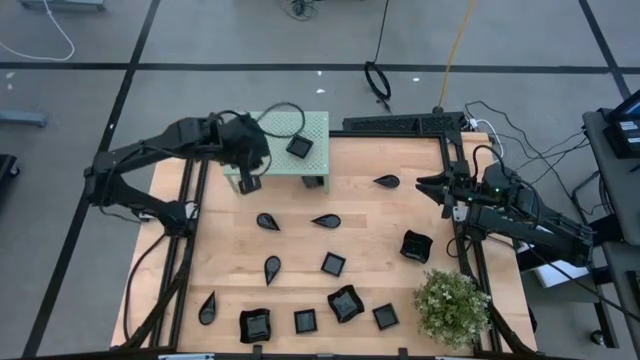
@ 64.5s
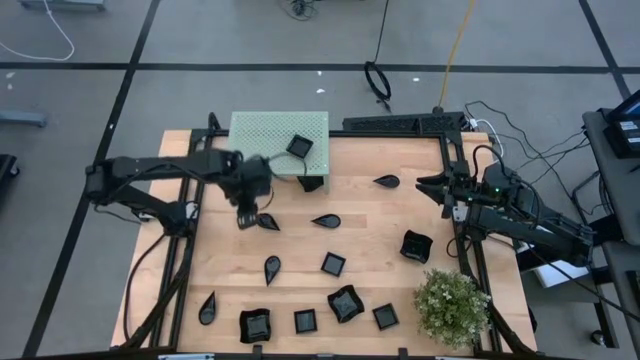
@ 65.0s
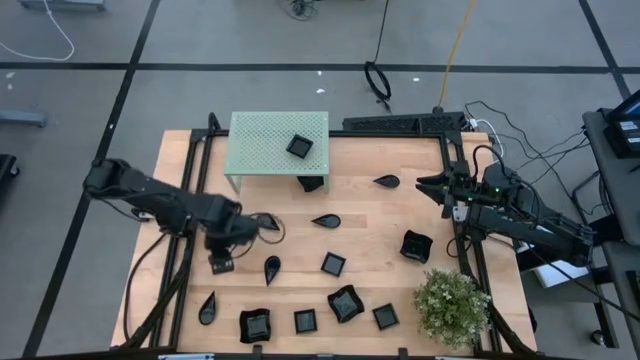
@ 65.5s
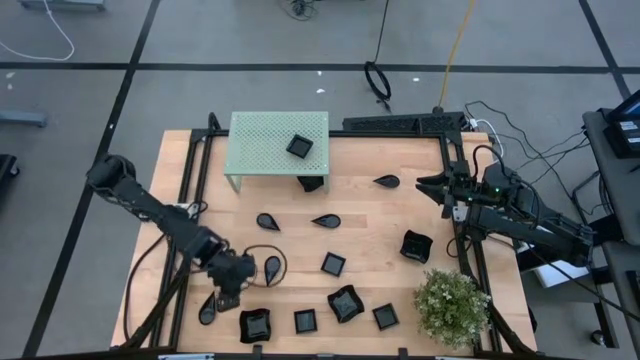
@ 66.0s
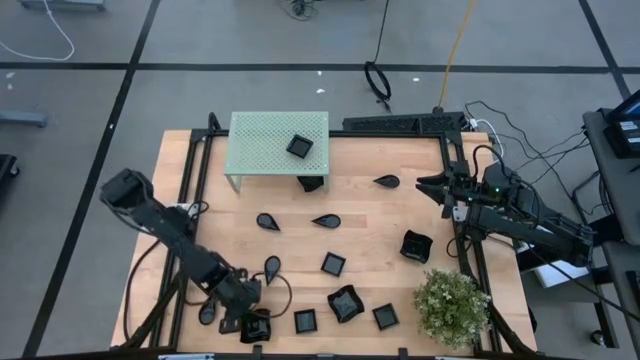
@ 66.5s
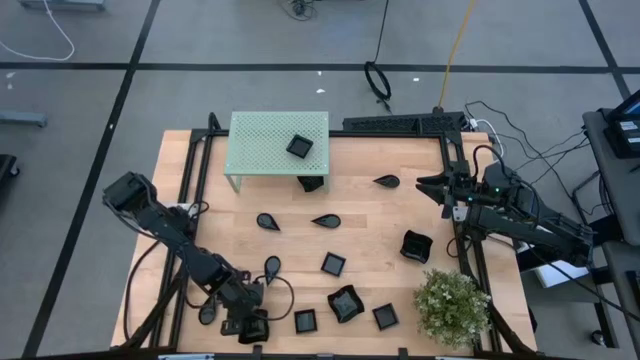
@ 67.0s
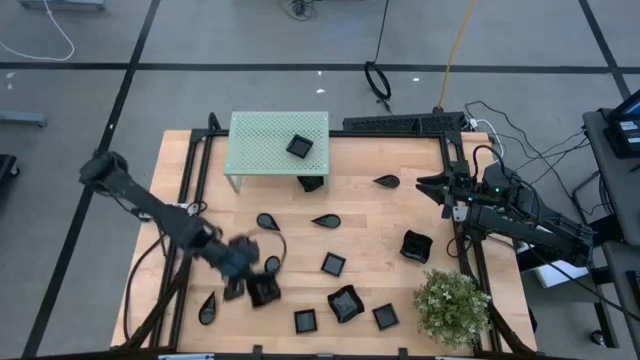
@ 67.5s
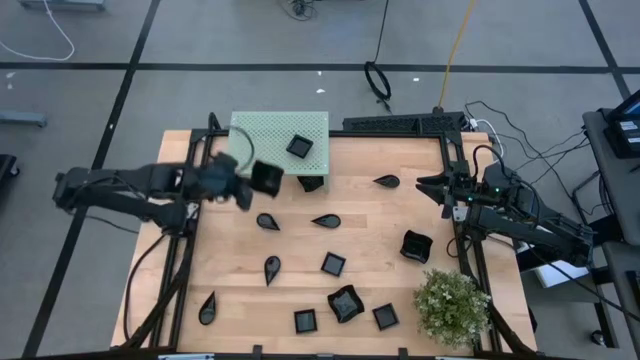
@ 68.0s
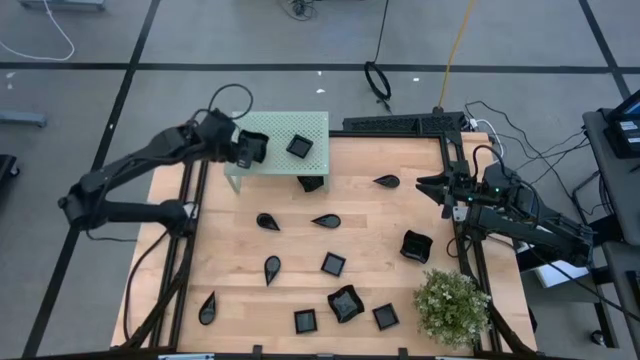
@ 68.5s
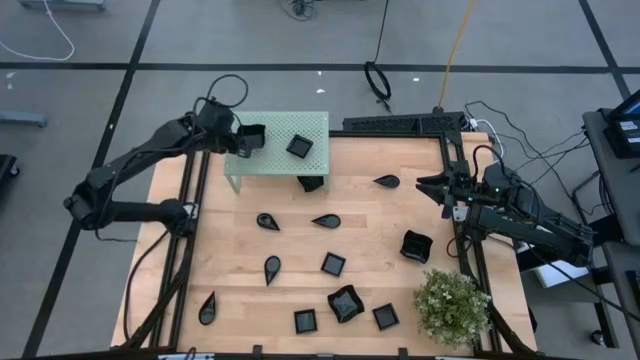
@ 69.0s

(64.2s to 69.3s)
Task: Pick & Place Mini shaped plates
Put the distorted square plate on the shelf

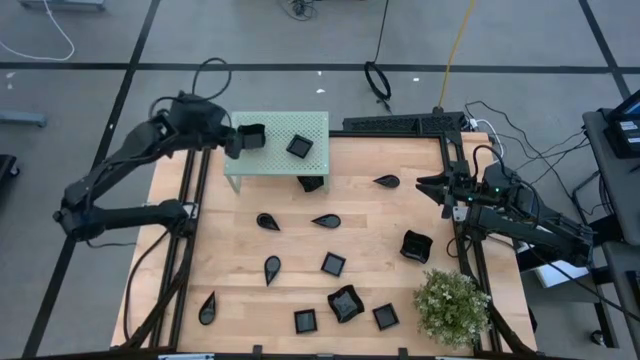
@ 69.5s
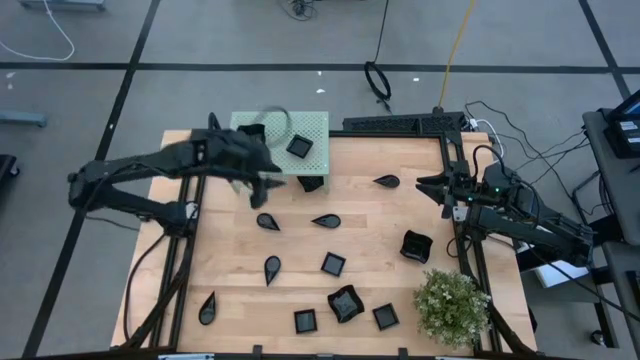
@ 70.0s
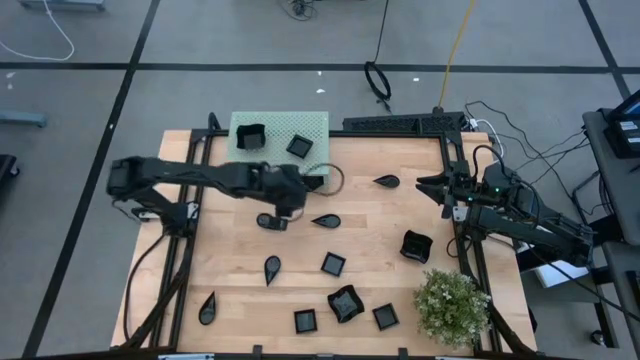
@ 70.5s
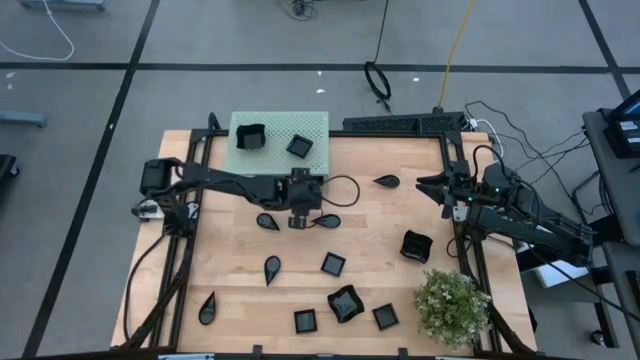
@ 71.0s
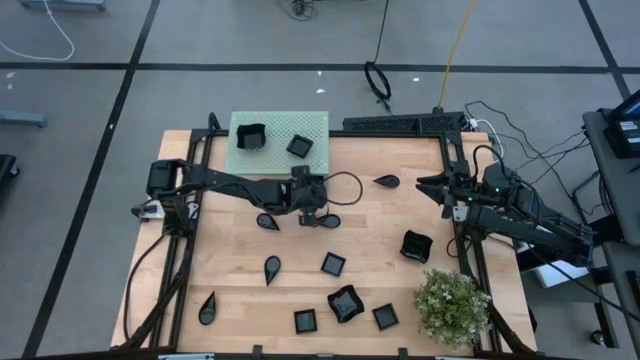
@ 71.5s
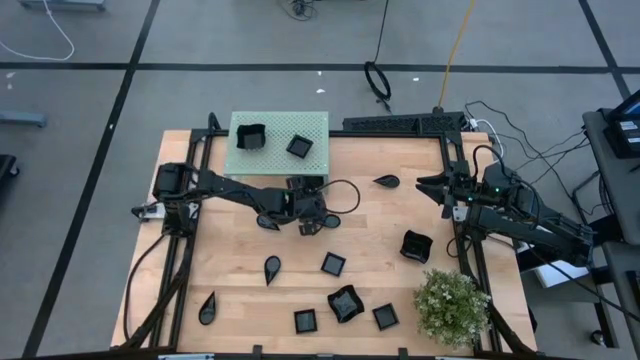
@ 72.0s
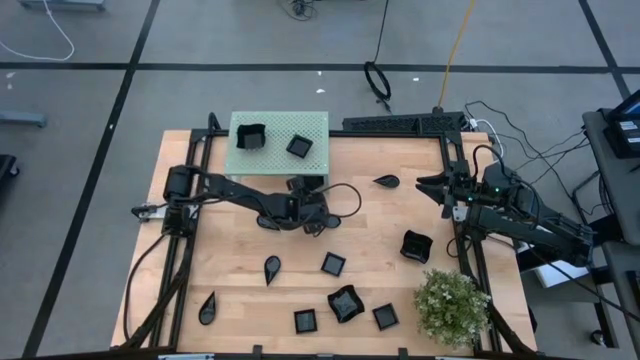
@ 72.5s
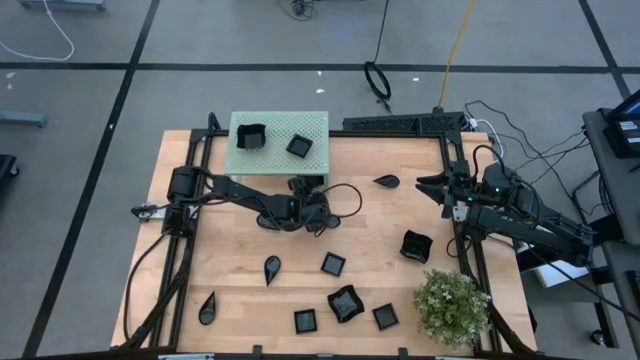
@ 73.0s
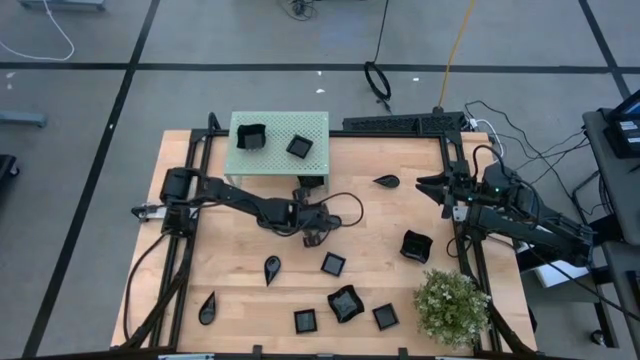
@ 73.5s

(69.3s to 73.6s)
Stack the distorted square plate on top of the distorted square plate on the shelf

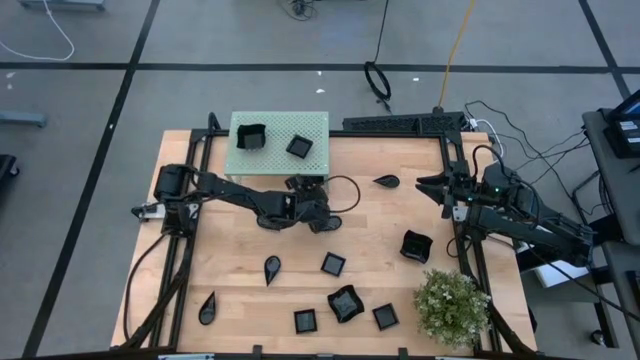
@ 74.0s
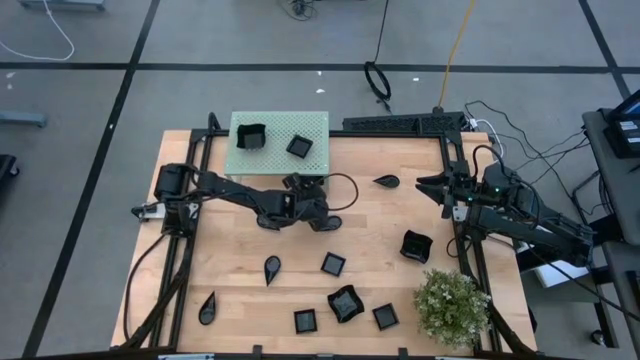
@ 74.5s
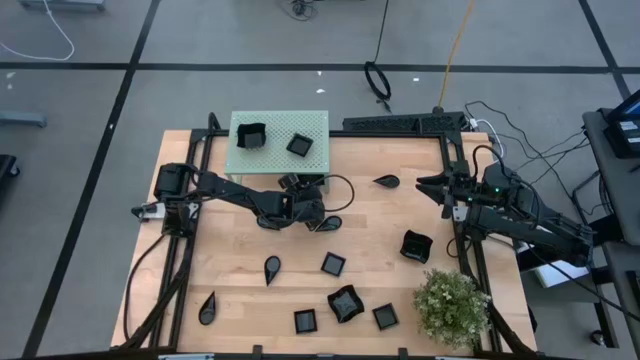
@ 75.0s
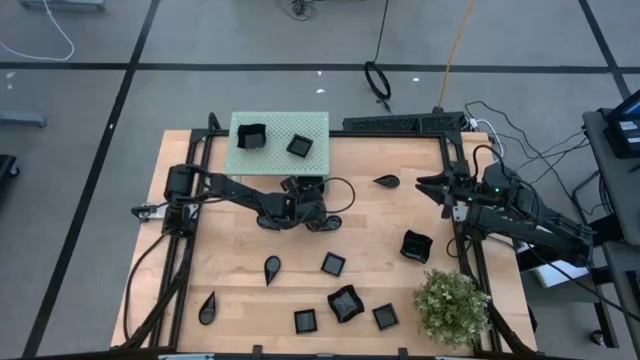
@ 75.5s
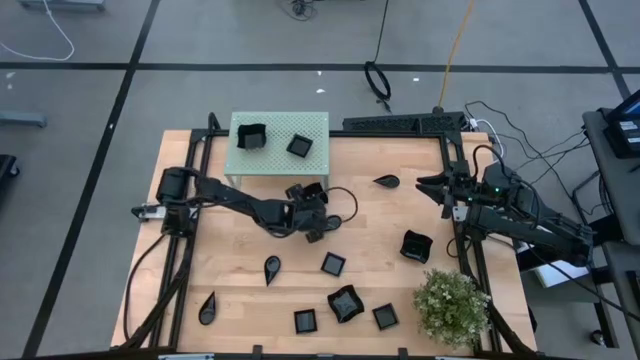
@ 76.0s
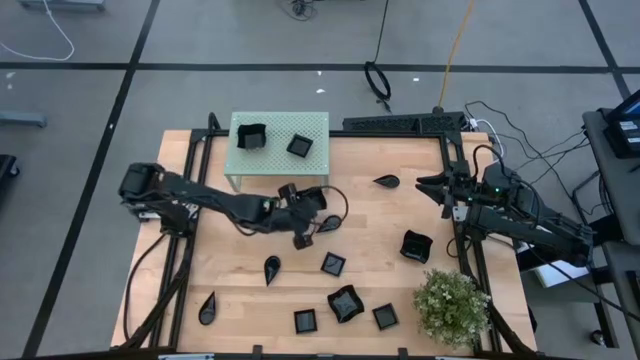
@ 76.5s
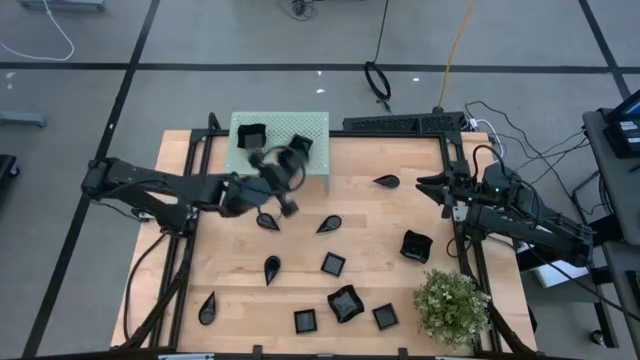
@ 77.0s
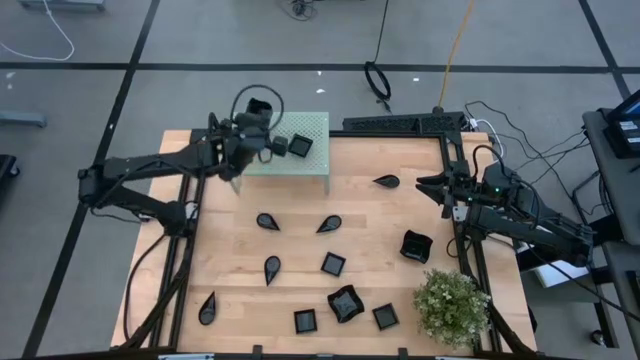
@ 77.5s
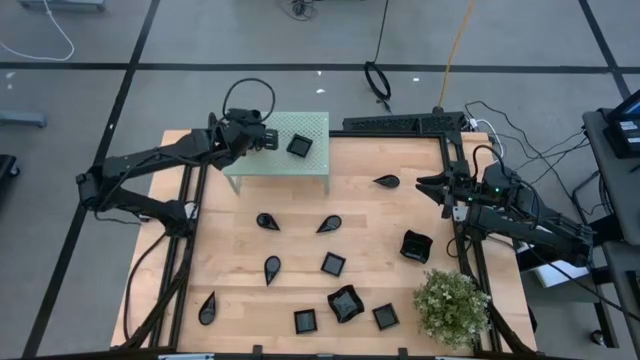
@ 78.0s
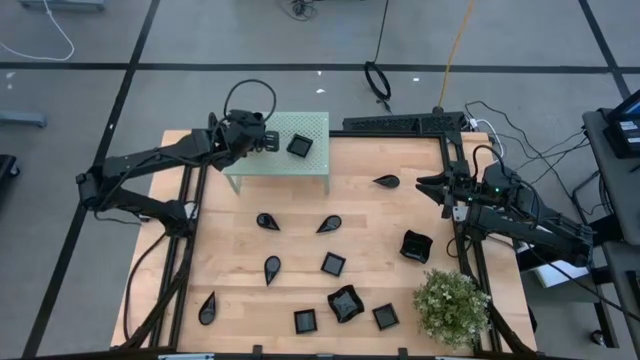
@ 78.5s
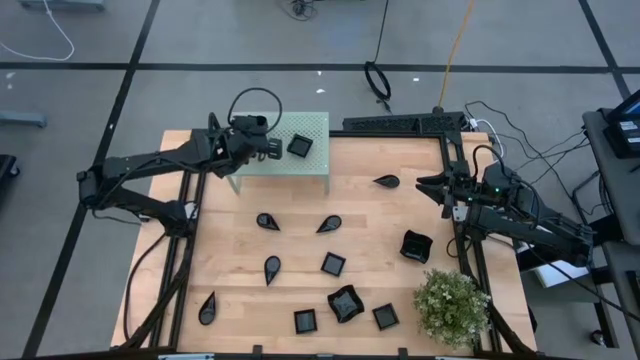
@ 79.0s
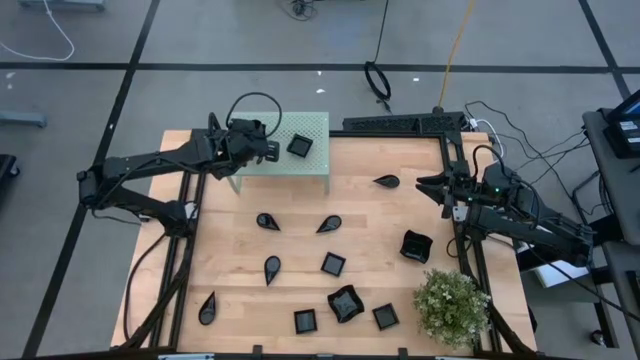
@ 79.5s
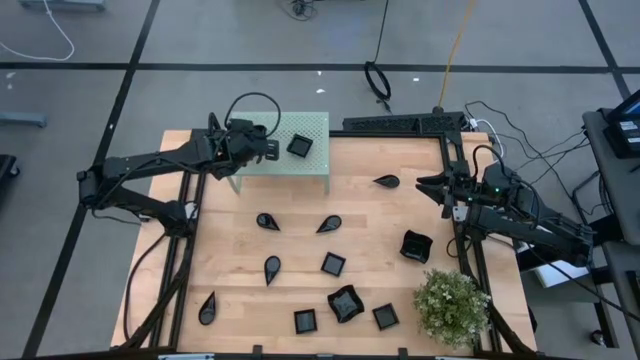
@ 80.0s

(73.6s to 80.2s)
Stack the distorted square plate on top of the distorted square plate on the shelf

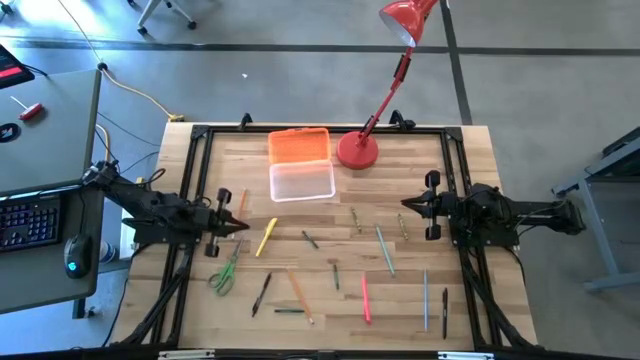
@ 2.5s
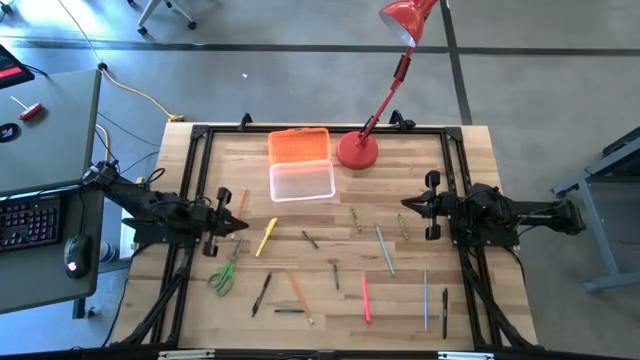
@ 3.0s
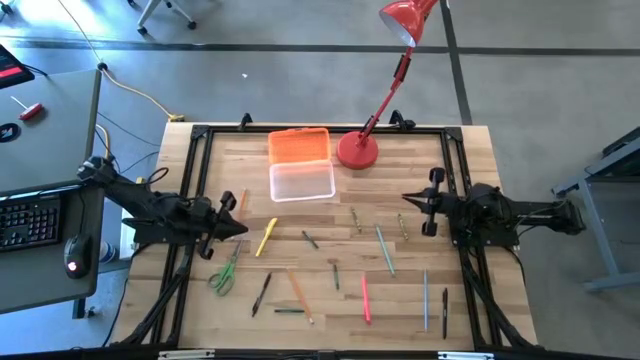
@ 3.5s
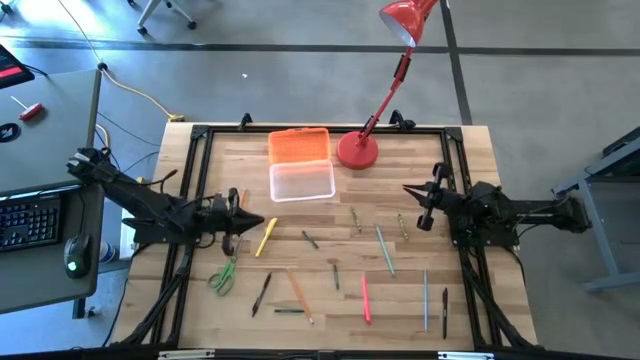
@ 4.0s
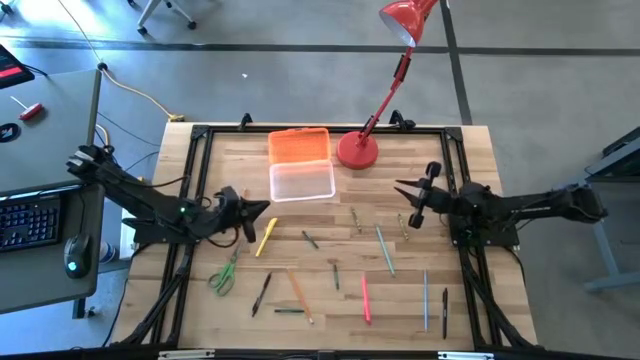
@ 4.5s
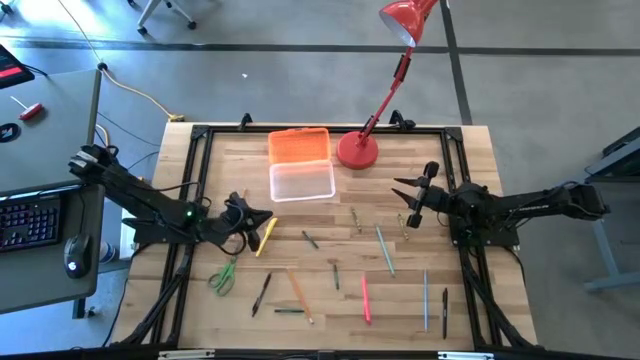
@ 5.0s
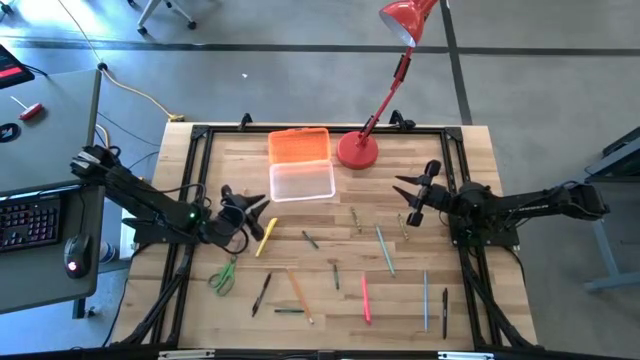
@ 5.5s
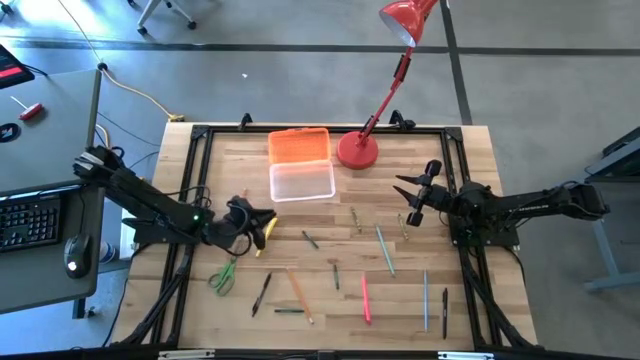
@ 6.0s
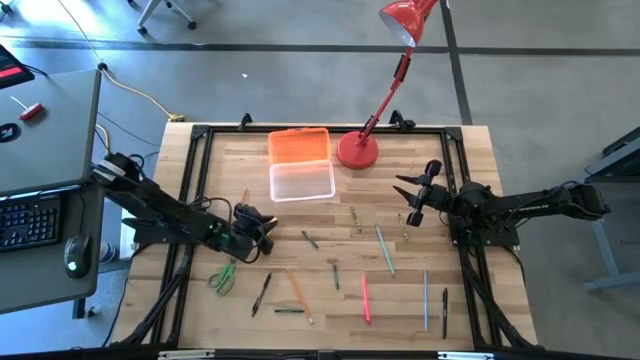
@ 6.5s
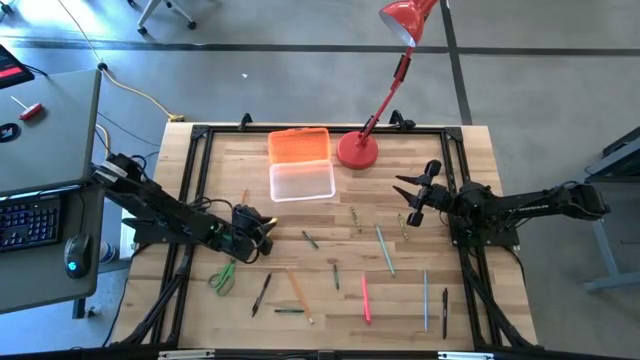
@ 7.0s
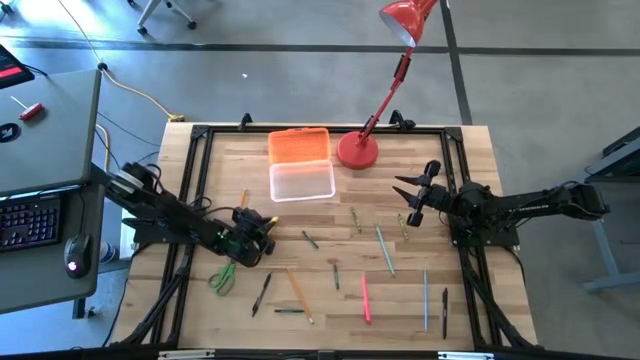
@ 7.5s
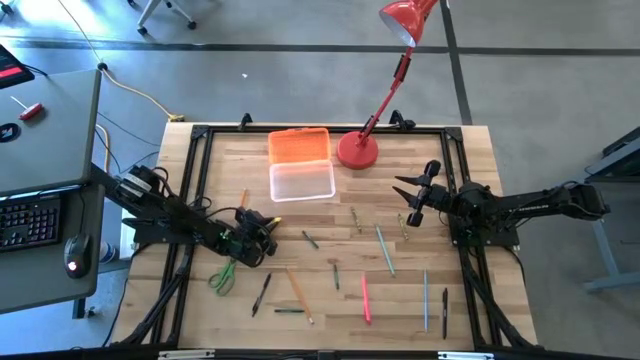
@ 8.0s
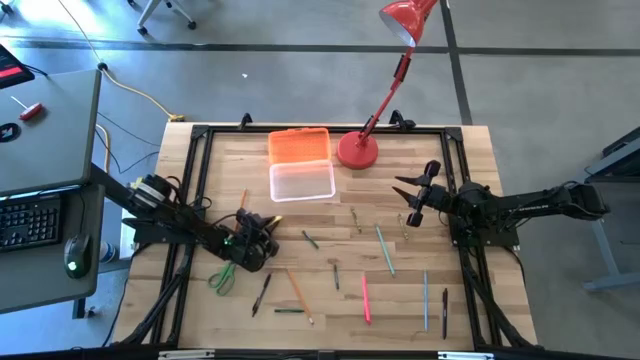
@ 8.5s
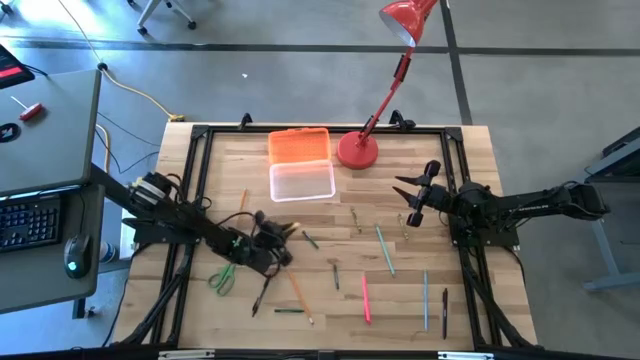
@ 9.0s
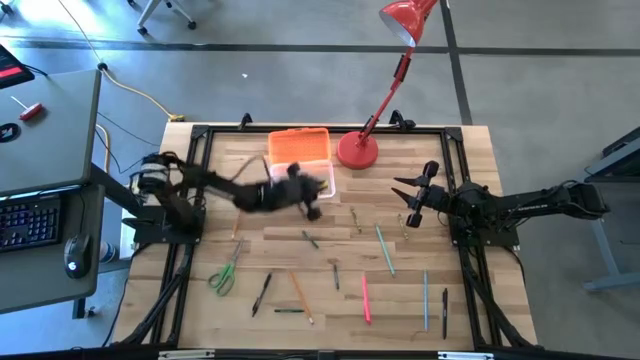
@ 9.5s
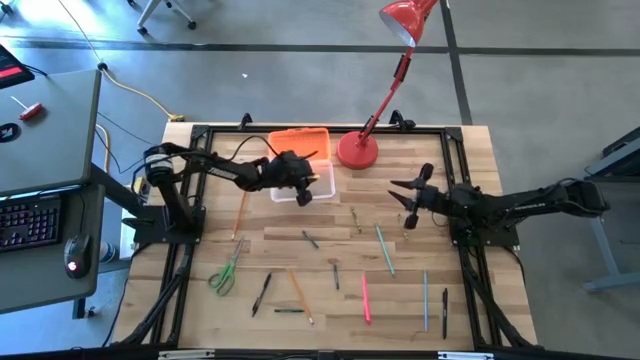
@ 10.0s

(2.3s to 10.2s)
Task: Pick & place school supplies into a supply box
Put the yellow pen into the orange supply box
